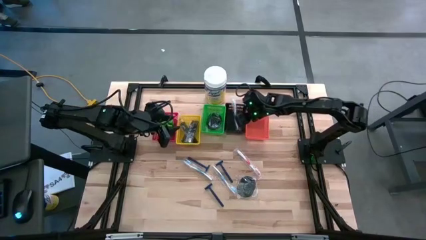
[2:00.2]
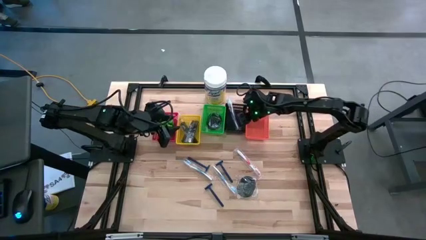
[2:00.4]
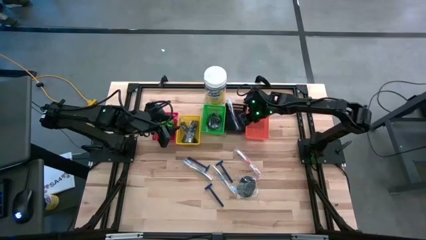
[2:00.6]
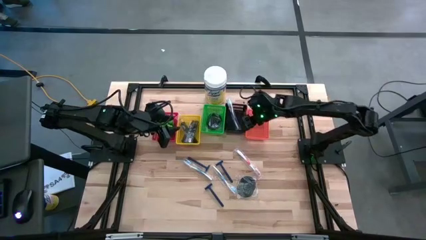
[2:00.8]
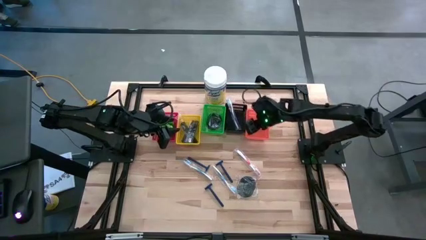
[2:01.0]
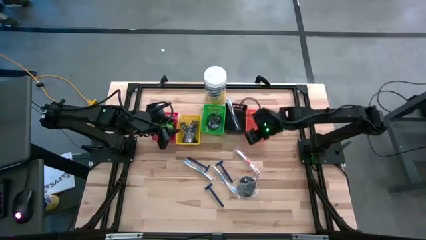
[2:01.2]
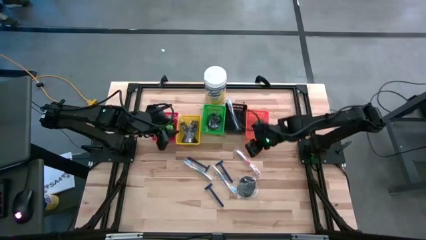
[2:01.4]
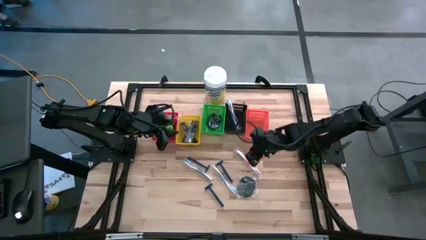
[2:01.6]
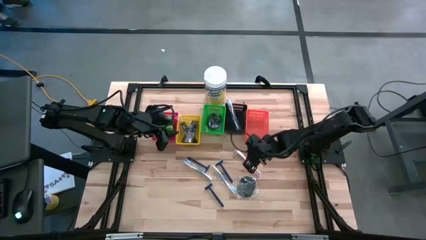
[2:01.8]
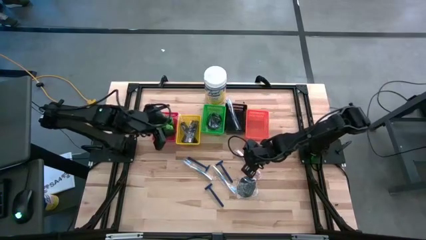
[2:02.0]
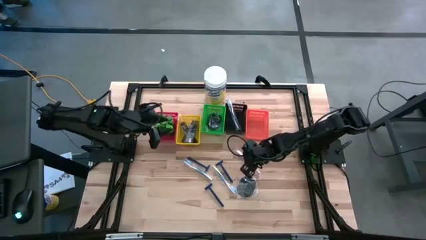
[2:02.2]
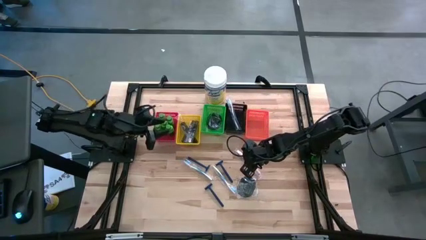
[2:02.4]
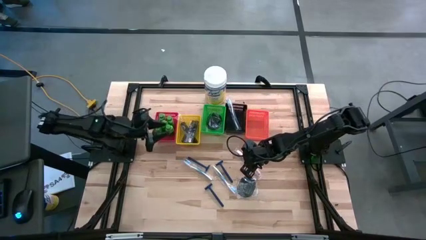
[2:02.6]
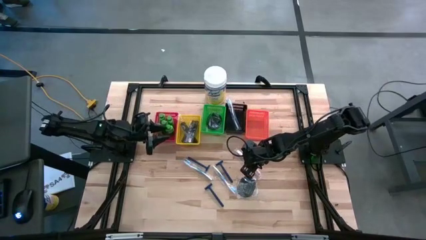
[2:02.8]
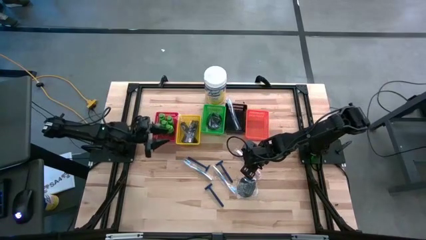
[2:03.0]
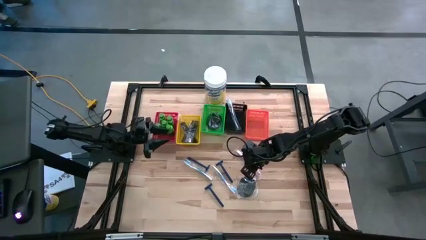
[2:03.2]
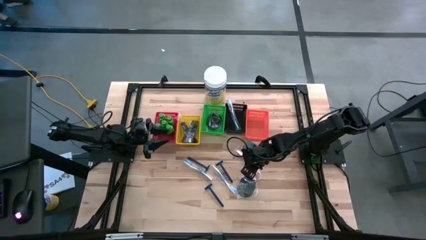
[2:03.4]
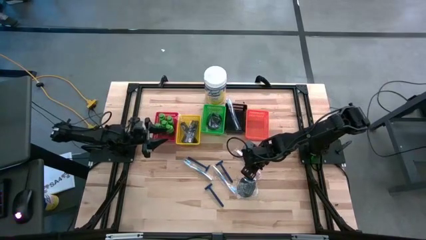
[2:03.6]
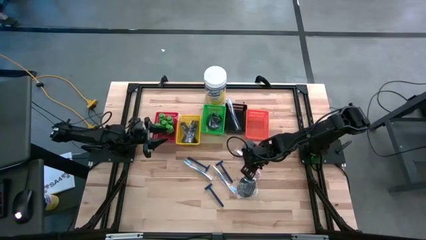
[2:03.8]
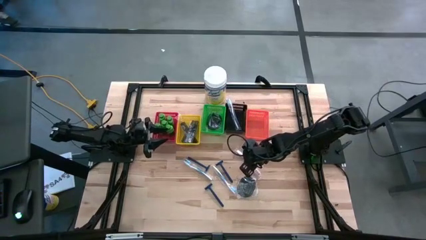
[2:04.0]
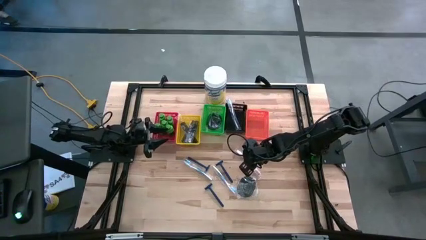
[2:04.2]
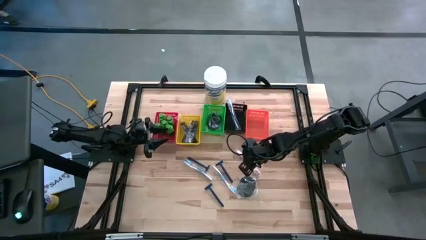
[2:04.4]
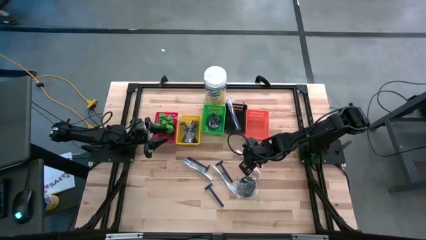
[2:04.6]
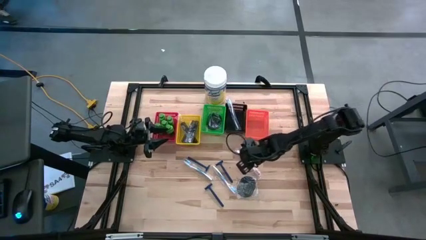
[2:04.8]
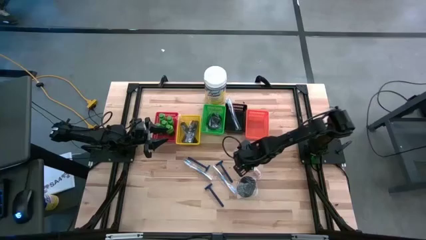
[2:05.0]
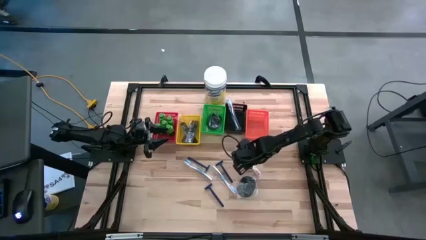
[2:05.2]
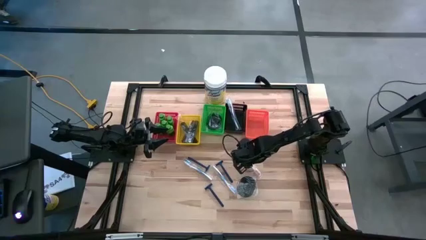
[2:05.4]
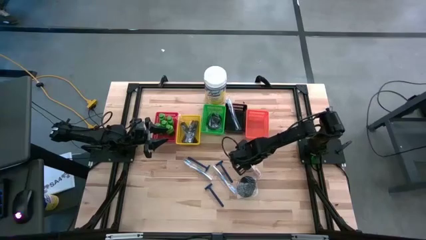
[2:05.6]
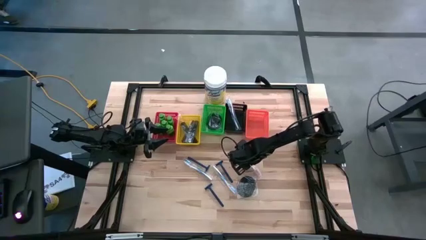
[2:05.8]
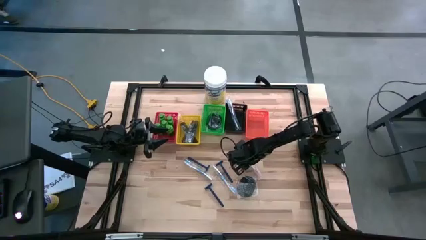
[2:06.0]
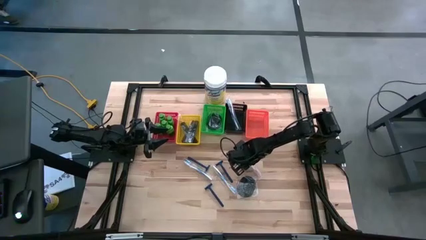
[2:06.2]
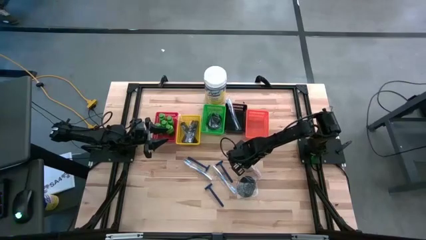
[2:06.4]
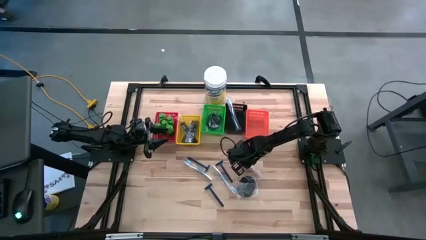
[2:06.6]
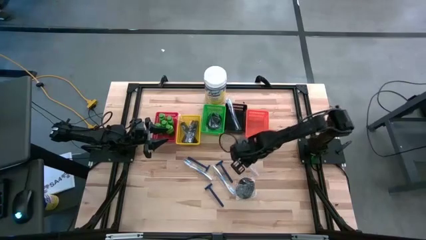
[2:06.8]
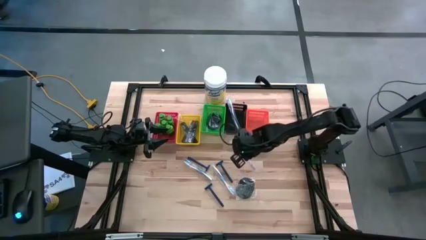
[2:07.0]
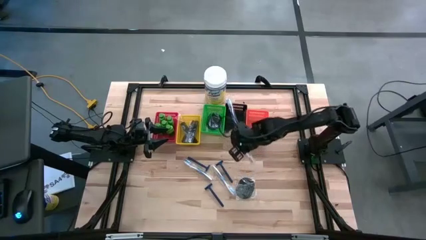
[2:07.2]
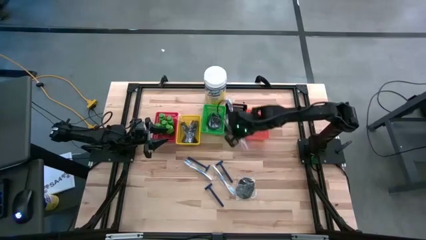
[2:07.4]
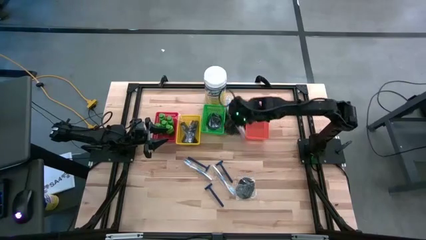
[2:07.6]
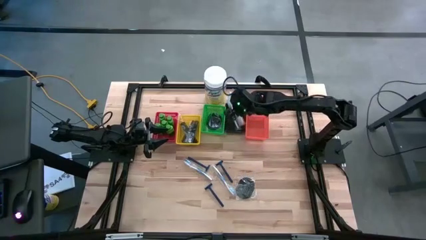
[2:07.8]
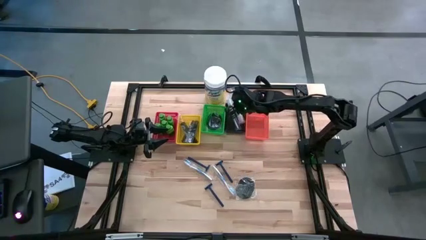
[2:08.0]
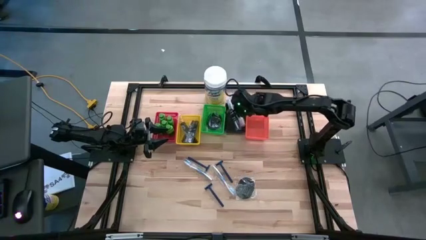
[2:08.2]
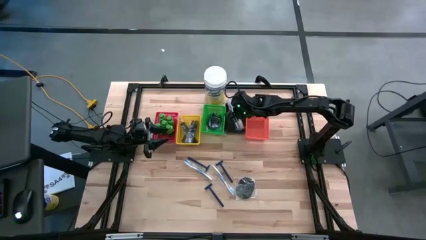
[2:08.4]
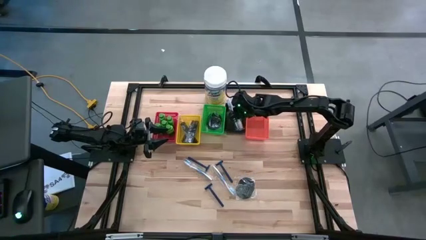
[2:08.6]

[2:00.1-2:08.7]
Task: Pick & Place Travel size toiletries
Put the orange toothbrush into the black bin

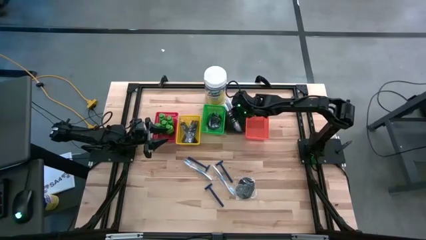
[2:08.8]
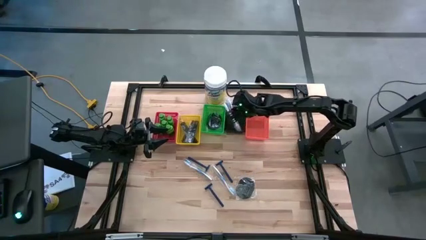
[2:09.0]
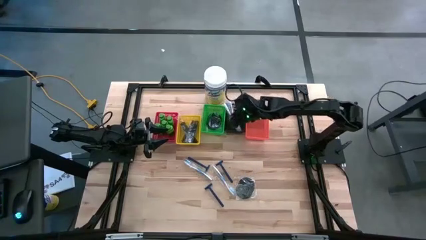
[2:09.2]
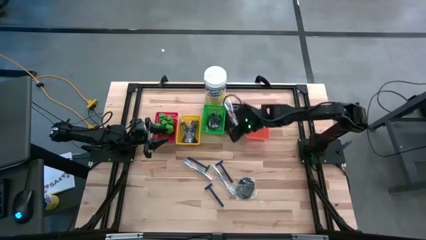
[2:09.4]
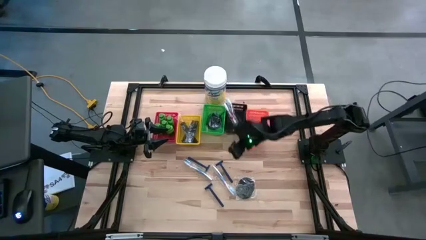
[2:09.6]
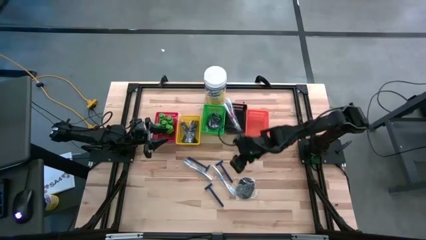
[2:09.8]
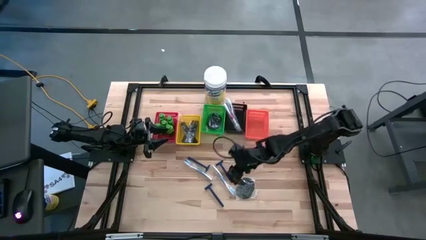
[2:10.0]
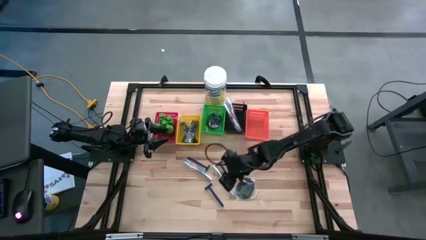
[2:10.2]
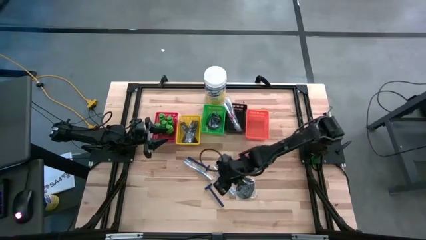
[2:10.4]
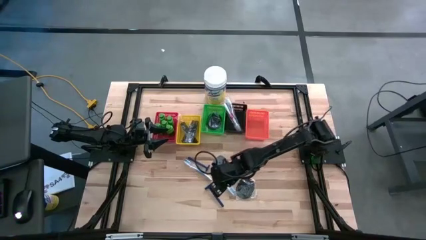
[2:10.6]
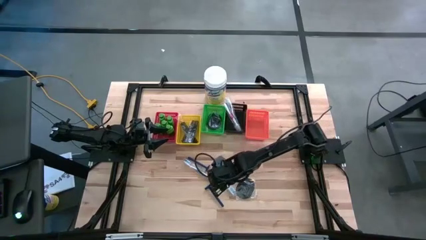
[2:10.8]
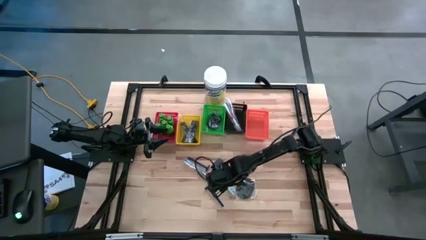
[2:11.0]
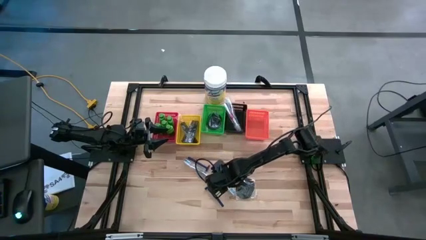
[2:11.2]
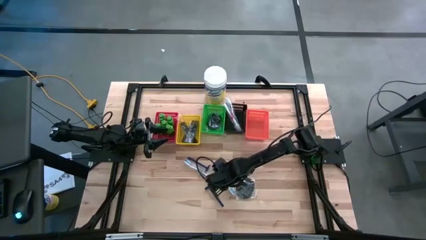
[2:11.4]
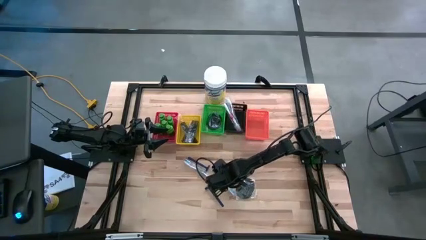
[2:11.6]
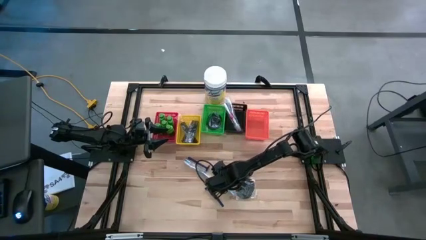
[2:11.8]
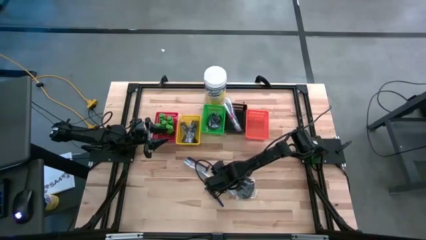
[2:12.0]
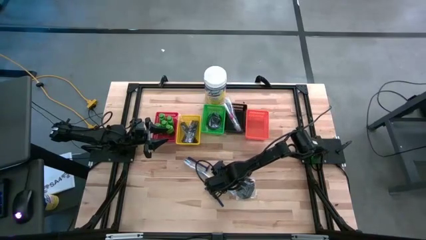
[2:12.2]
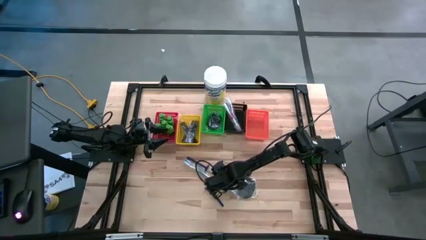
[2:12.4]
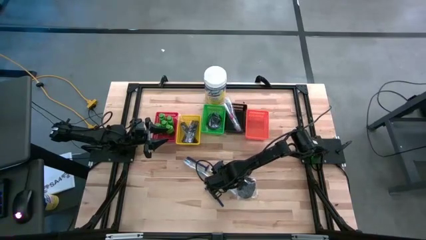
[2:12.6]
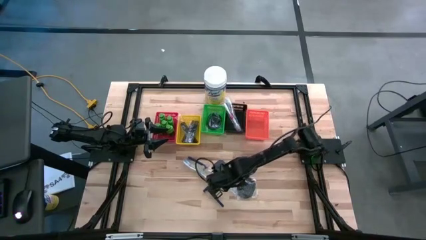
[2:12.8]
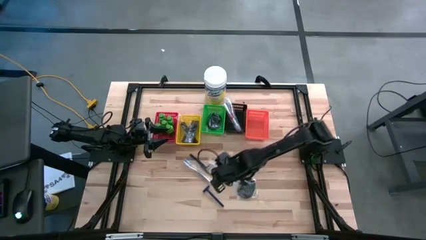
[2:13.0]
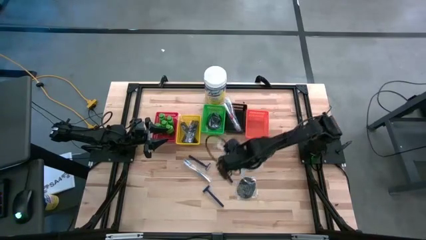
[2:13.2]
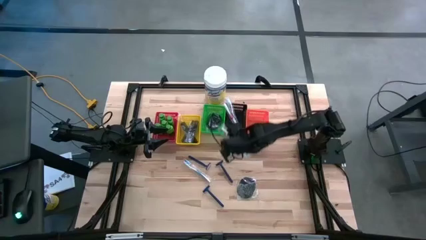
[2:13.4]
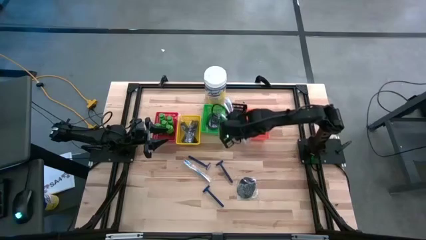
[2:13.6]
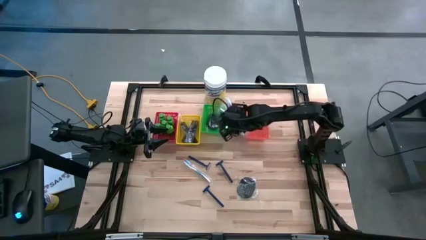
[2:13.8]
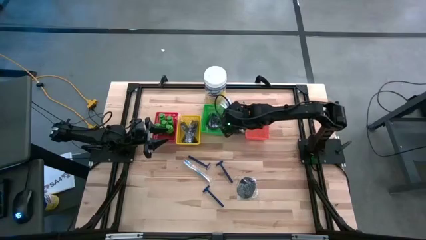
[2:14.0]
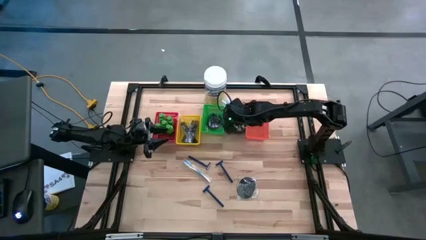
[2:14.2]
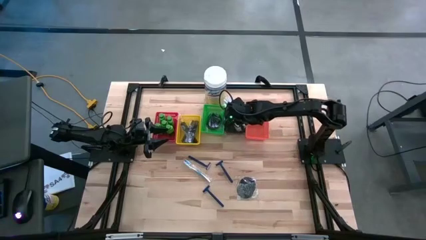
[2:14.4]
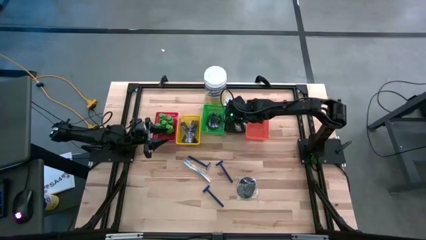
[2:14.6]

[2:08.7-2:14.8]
Put the blue toothbrush into the black bin

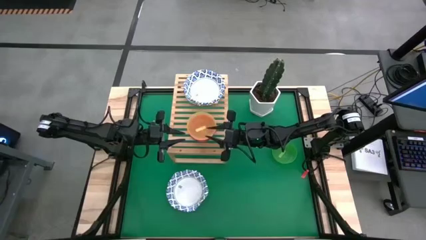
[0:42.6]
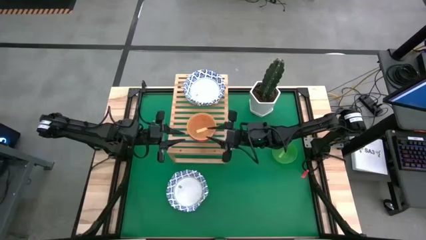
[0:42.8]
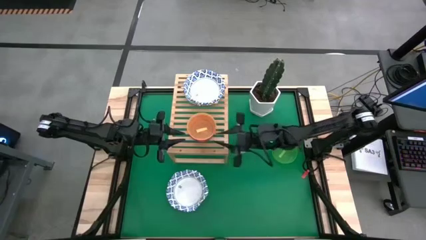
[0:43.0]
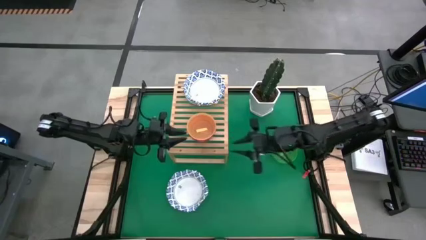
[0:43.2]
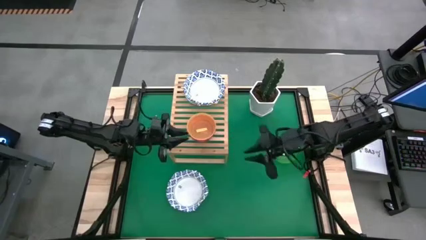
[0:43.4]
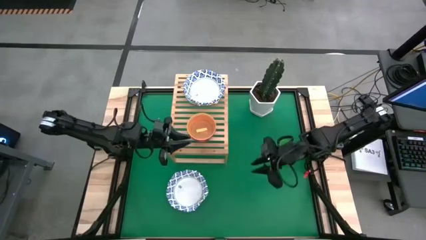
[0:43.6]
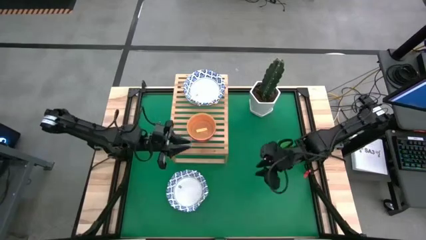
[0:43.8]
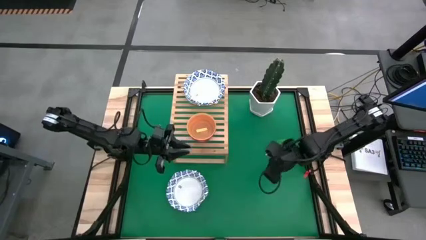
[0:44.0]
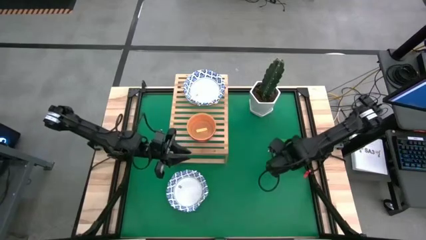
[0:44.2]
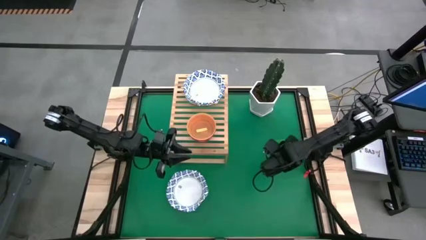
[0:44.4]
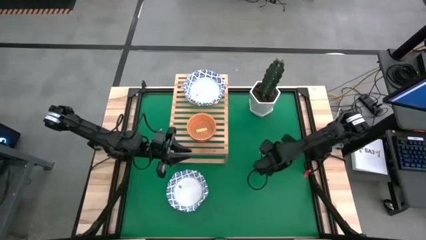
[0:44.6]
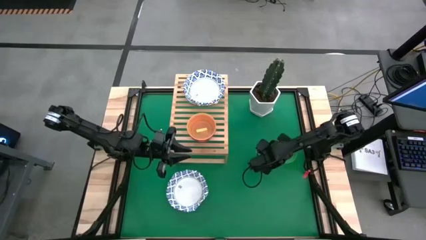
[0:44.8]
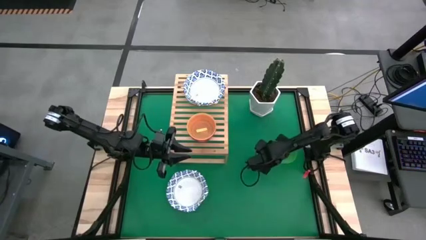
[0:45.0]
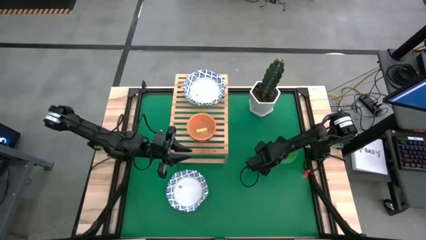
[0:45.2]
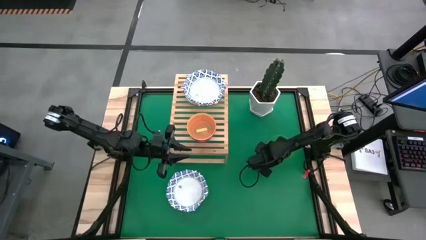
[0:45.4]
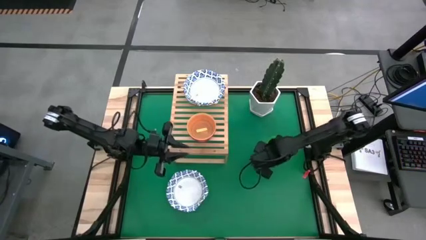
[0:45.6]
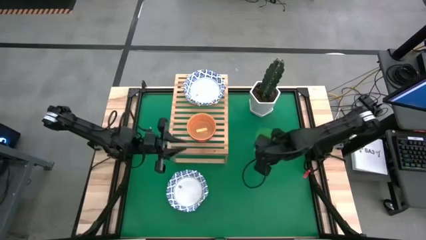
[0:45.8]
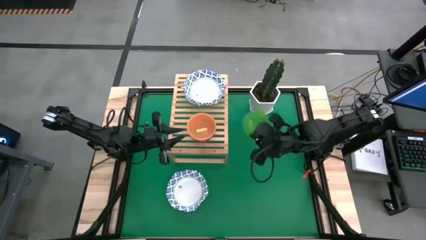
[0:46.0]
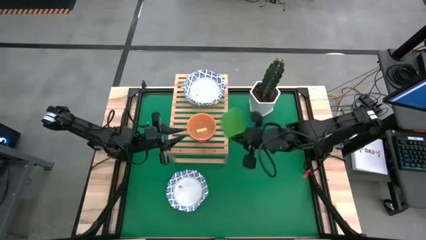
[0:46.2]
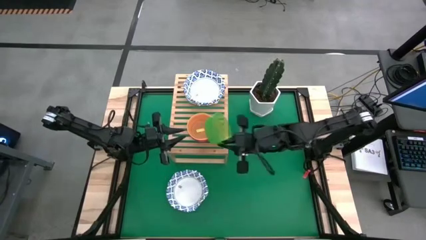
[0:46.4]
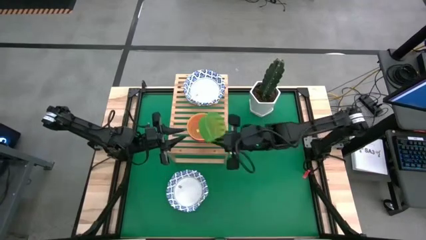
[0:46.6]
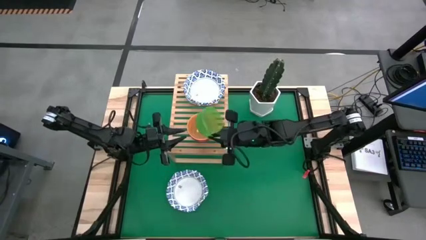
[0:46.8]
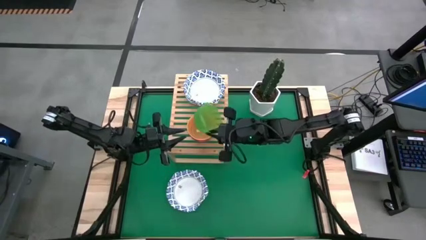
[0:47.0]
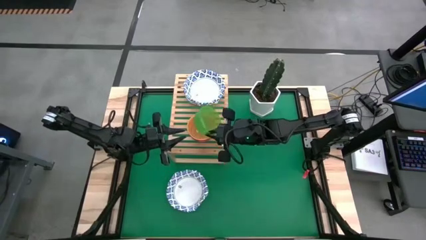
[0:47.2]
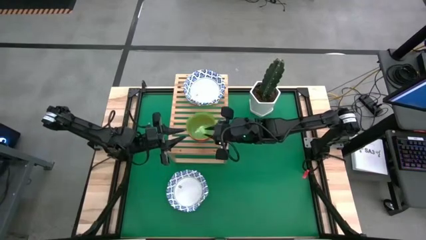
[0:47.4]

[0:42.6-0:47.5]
Task: Place and stack bowls onto a shelf
Stack the green bowl on top of the yellow bowl on the shelf
